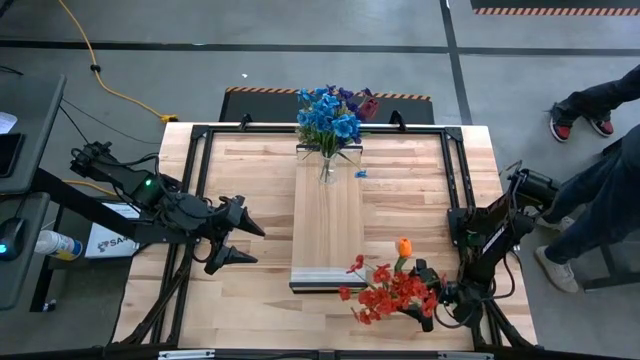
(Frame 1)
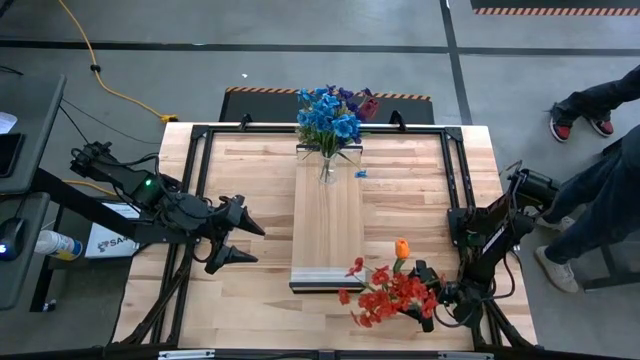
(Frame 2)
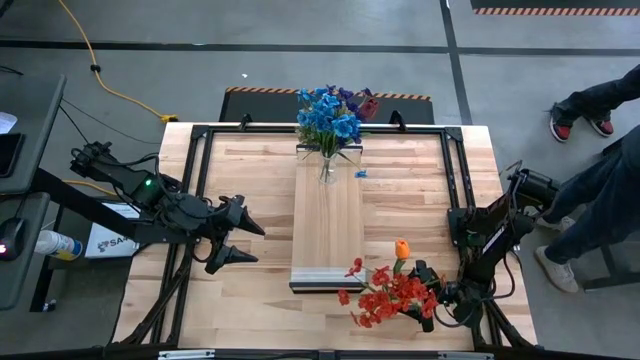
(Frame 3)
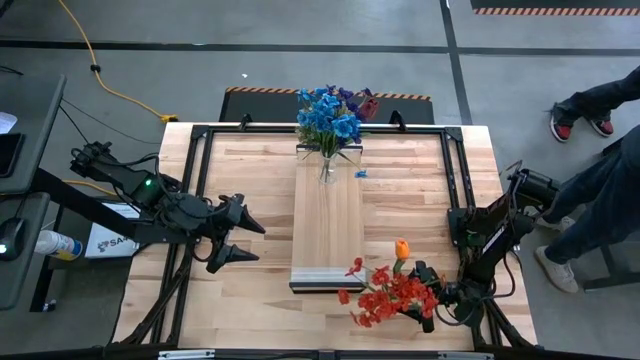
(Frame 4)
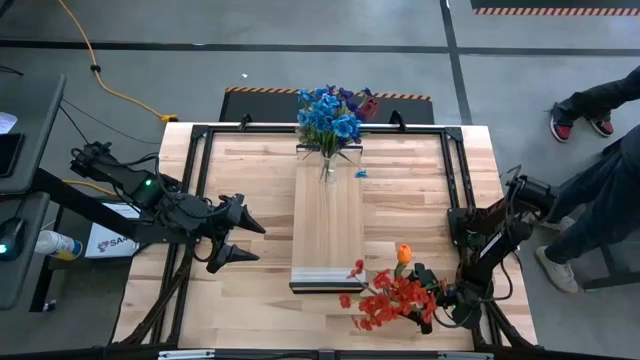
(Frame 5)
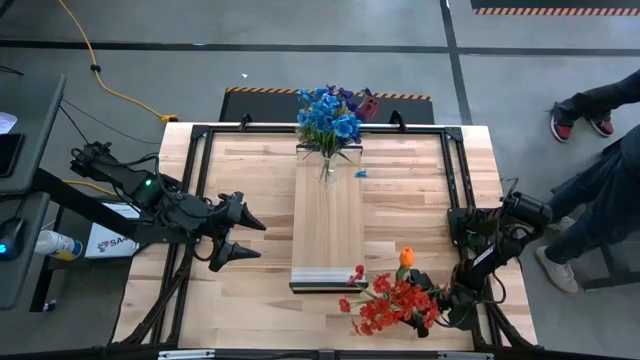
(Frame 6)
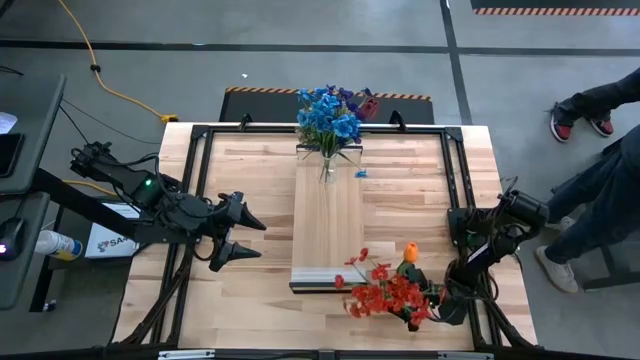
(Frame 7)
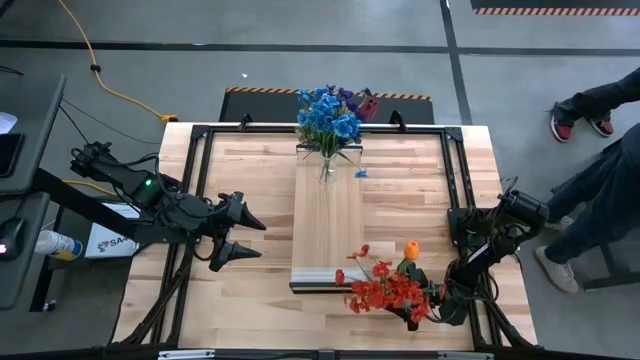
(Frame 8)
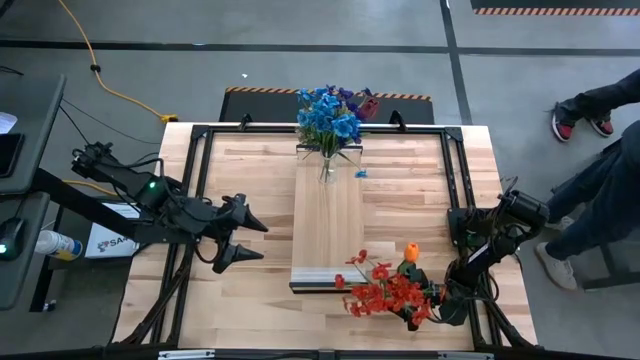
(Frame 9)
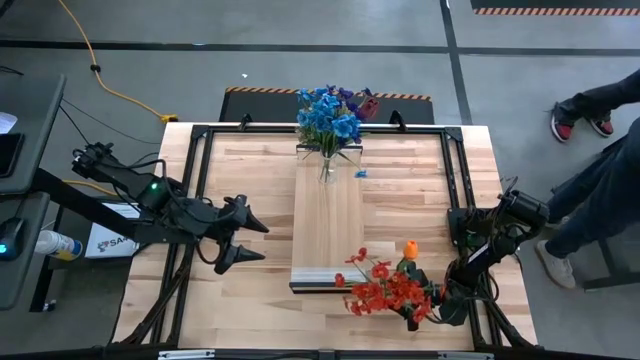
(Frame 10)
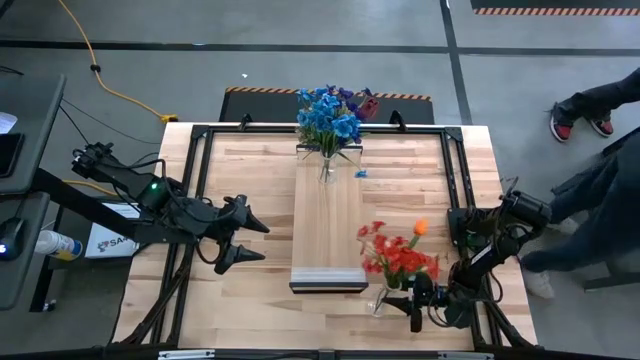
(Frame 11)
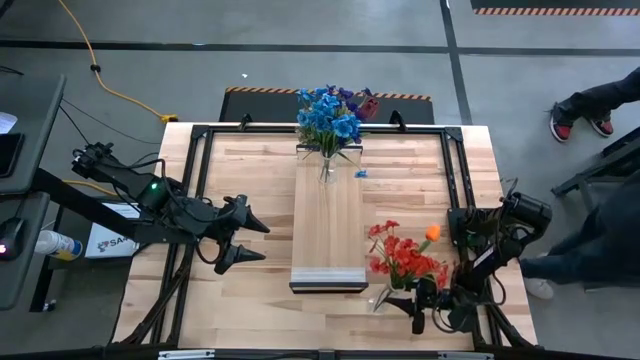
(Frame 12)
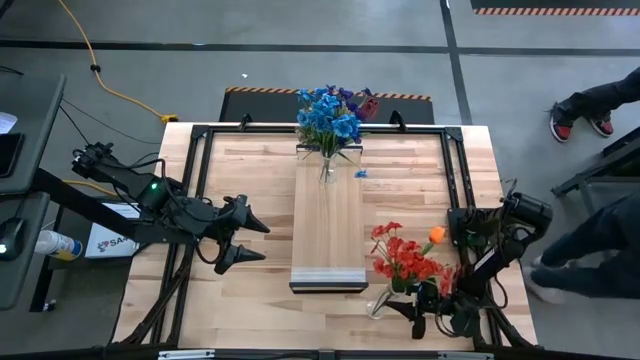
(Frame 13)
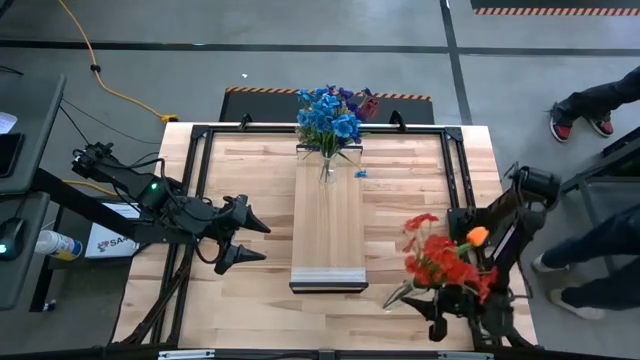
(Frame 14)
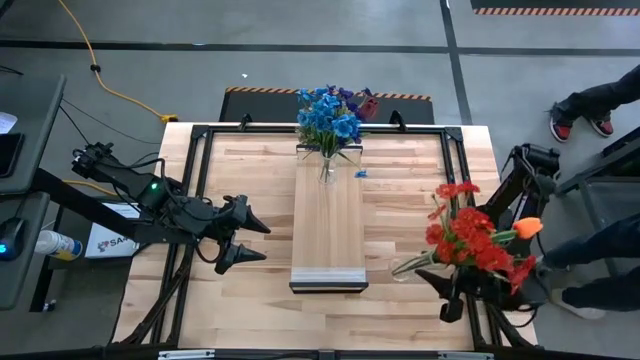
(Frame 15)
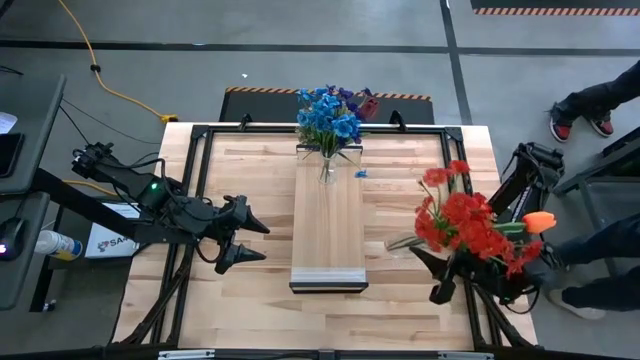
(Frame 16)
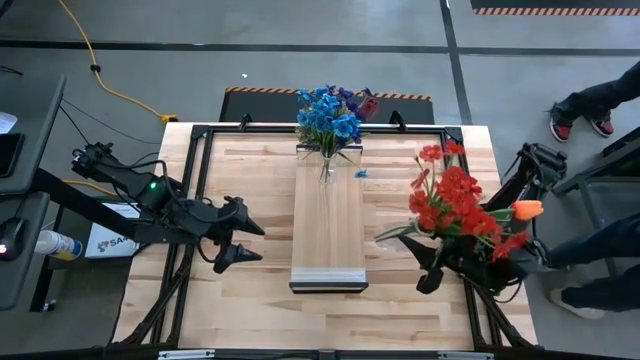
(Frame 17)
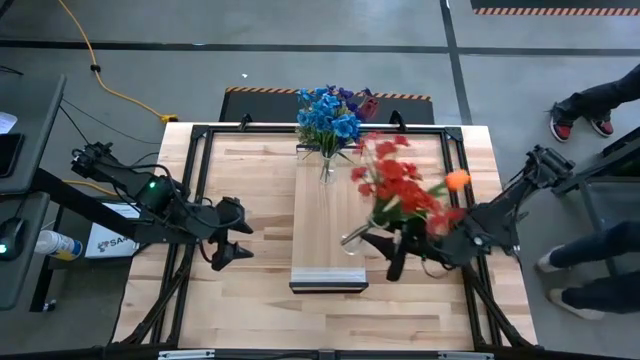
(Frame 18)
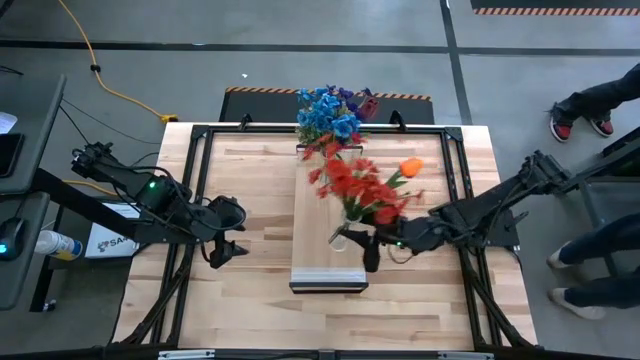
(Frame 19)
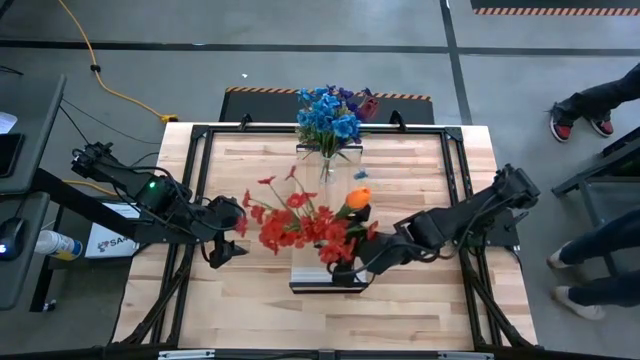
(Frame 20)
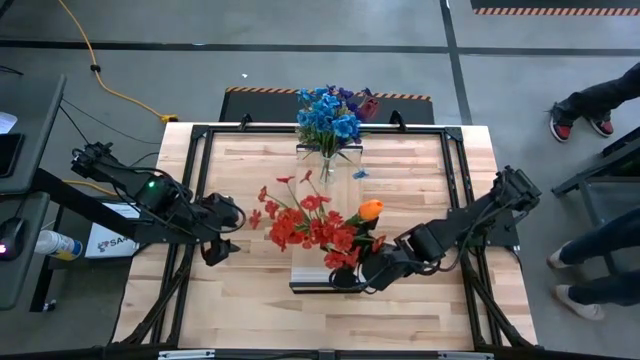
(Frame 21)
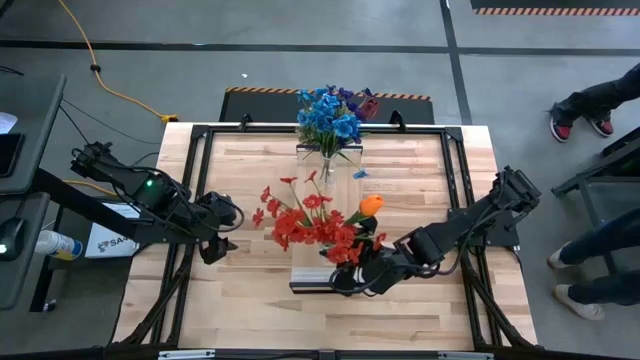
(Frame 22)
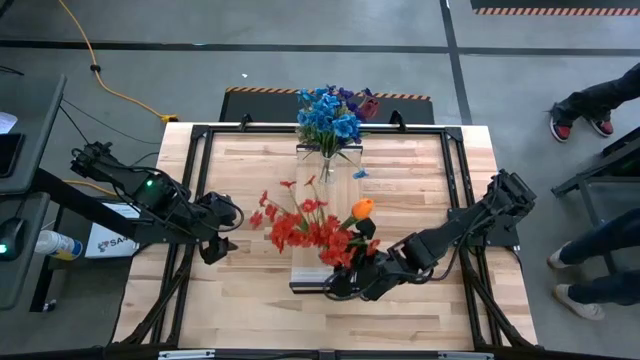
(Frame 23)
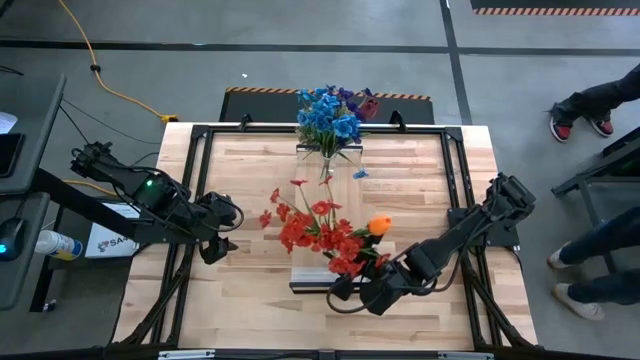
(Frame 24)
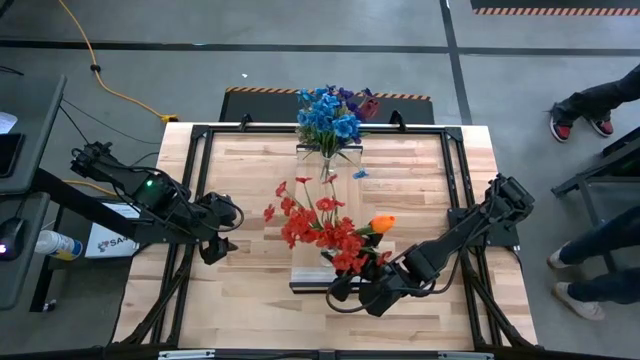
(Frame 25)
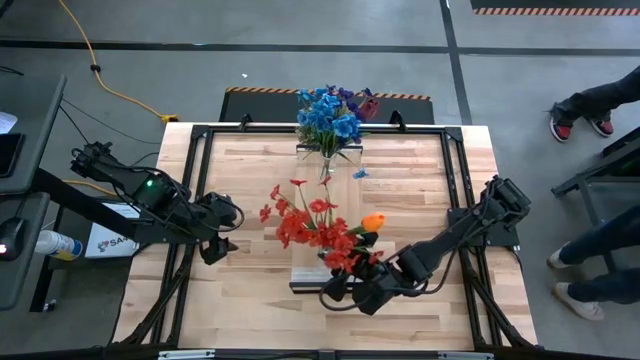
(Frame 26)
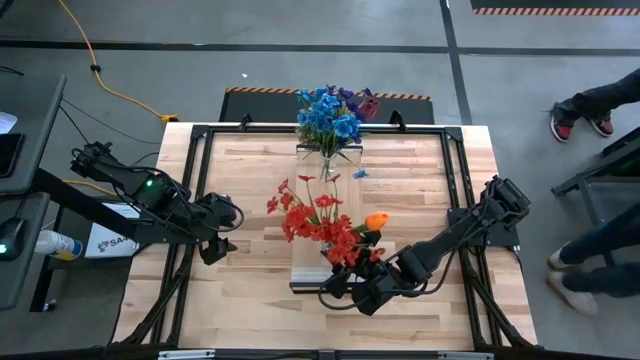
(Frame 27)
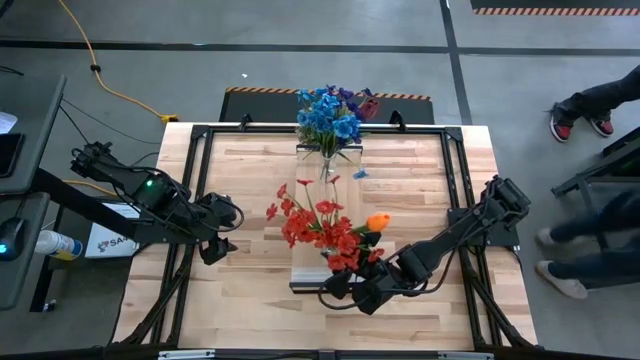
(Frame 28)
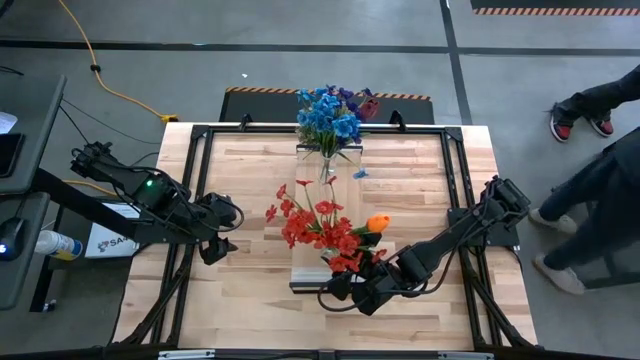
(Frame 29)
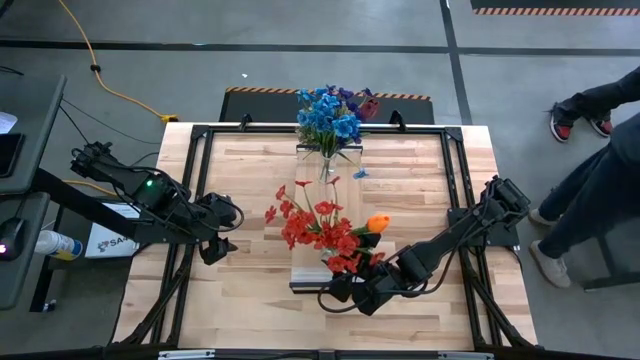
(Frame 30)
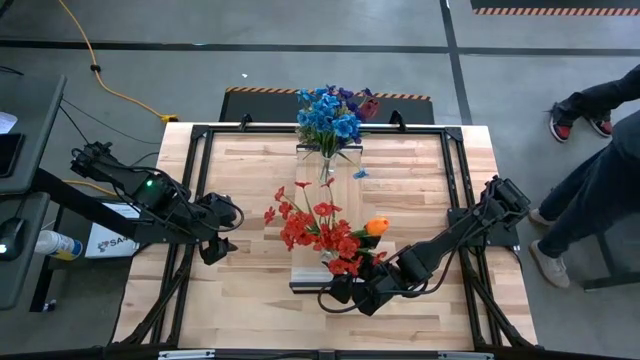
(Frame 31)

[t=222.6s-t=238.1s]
Task: Pick and place flowers into a vace then onto a shelf
Put the transparent vase on the shelf

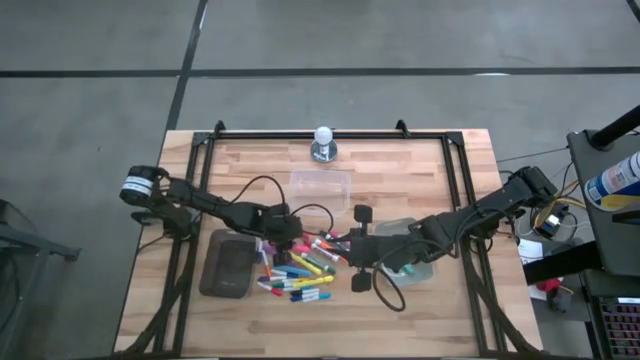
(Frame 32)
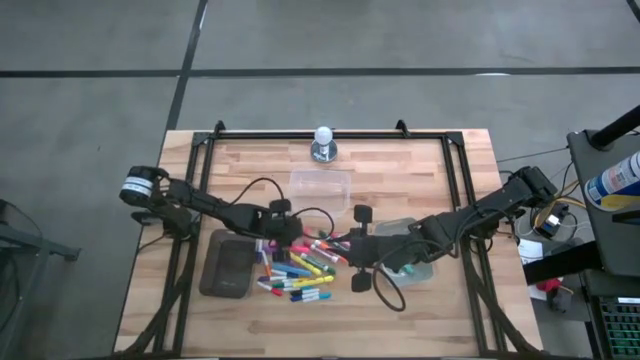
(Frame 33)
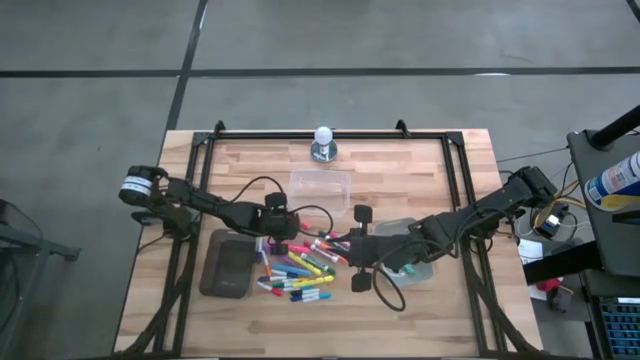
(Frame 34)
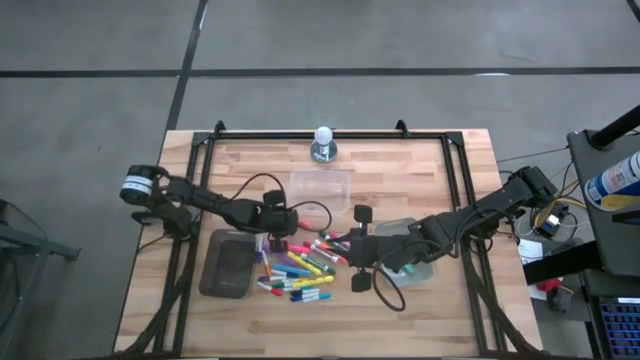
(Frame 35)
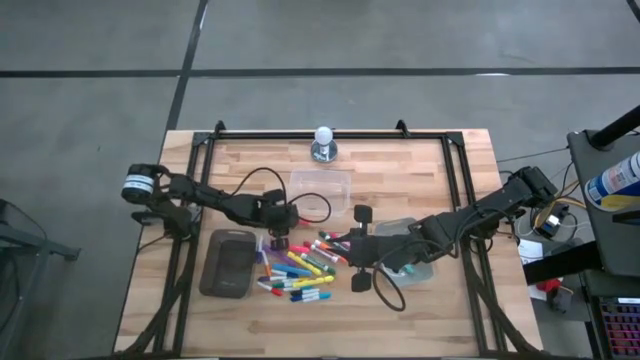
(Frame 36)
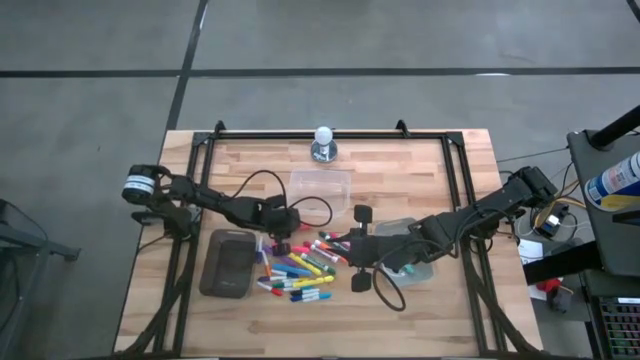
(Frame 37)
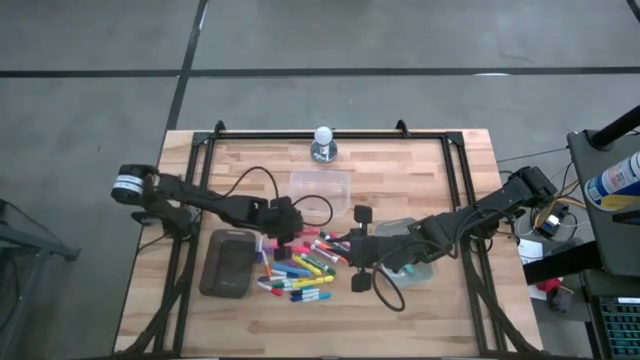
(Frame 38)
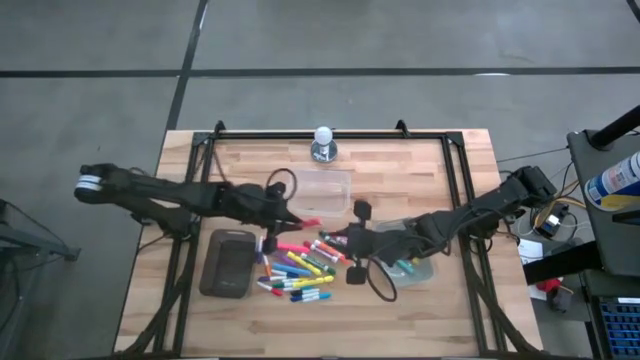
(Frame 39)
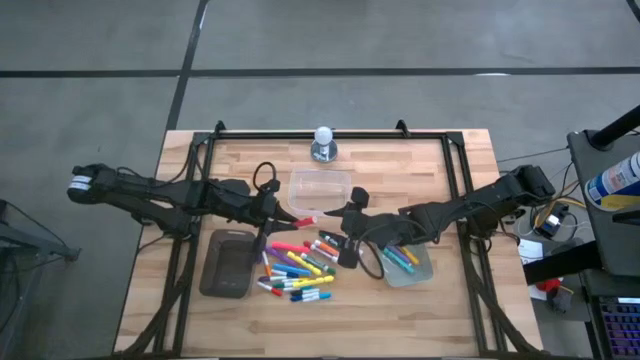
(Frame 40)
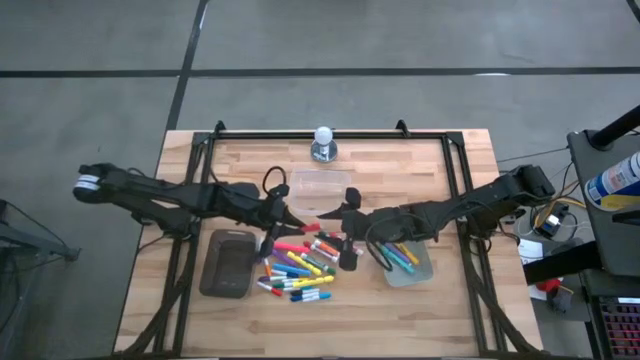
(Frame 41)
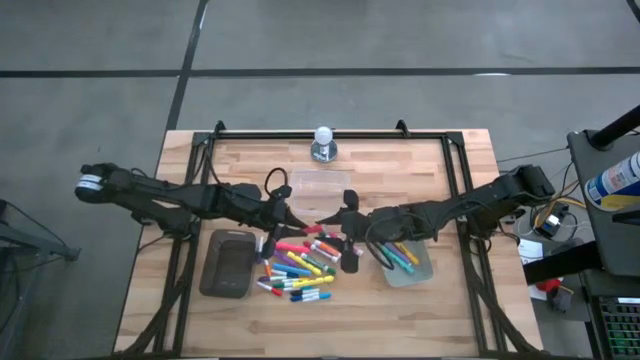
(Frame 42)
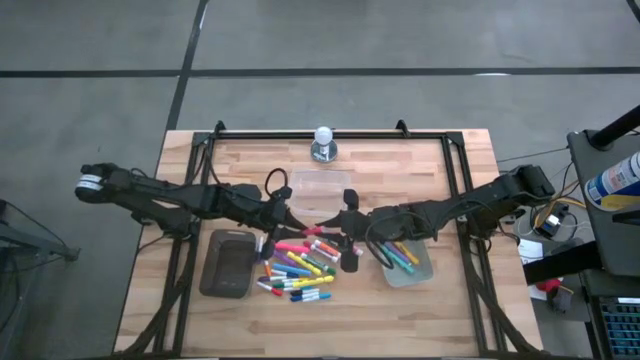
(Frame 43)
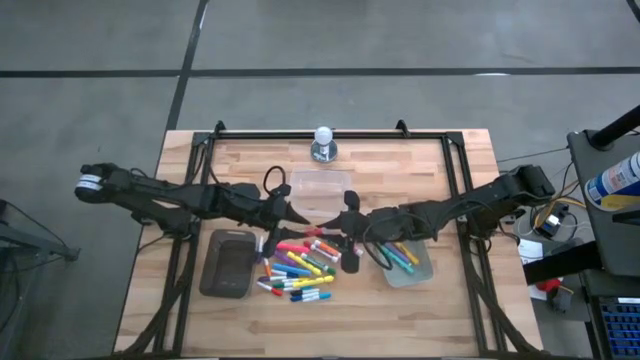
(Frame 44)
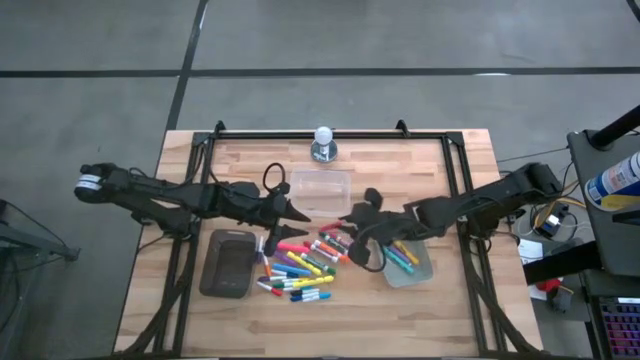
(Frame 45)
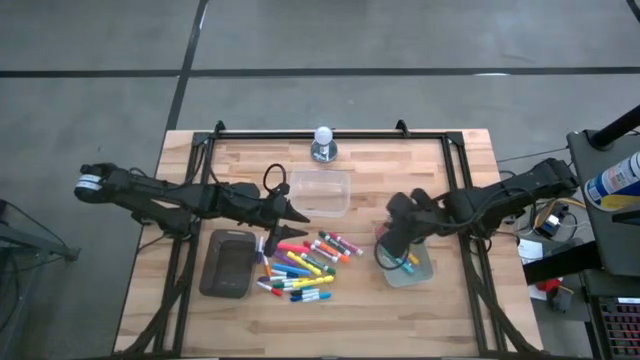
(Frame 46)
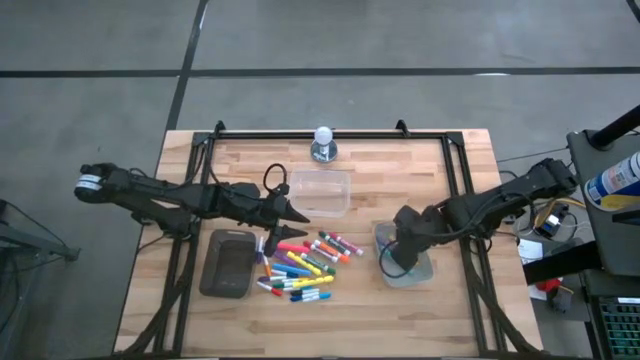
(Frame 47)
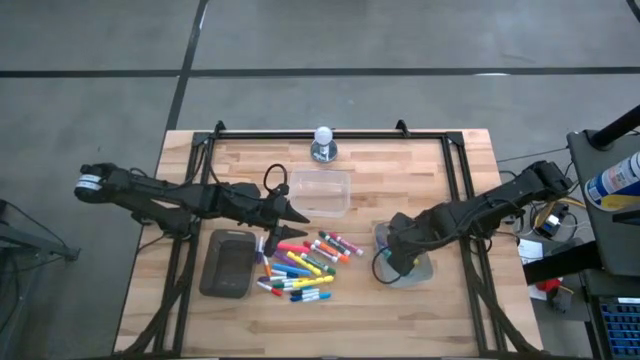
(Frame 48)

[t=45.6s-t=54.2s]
Task: Pick & Place Markers
Put the red highlighter into the gray bin
